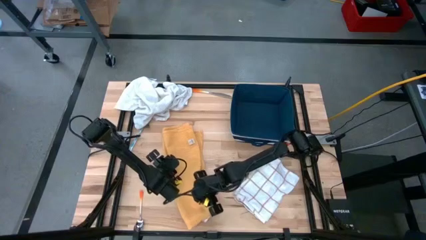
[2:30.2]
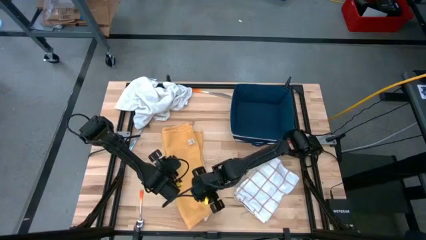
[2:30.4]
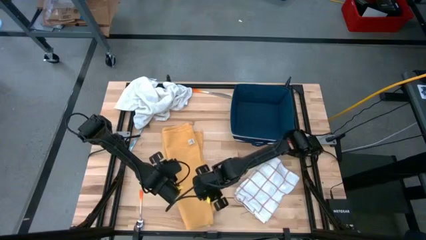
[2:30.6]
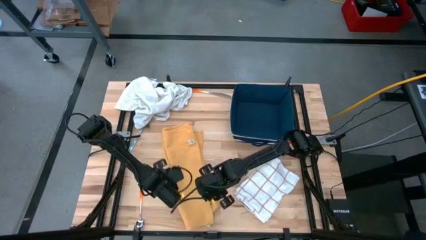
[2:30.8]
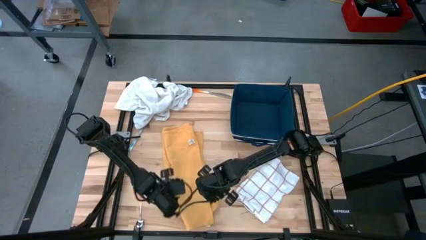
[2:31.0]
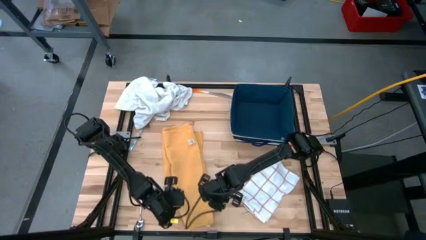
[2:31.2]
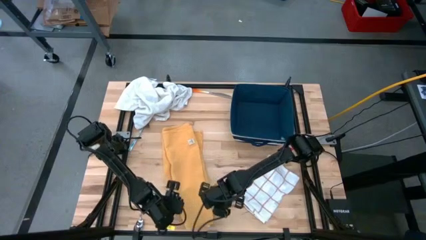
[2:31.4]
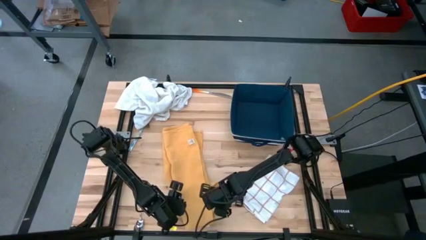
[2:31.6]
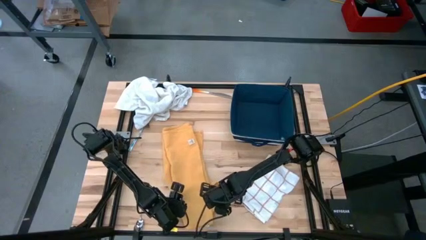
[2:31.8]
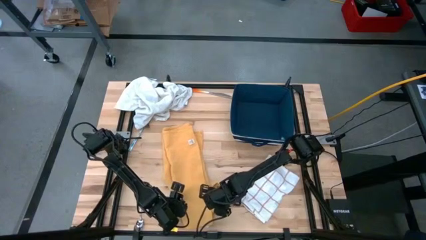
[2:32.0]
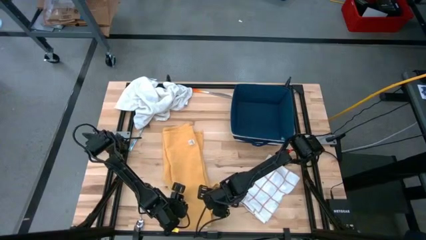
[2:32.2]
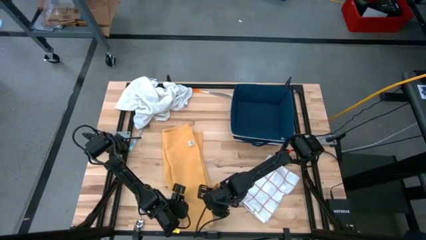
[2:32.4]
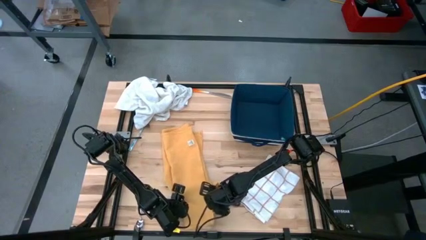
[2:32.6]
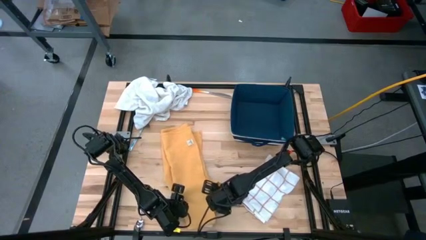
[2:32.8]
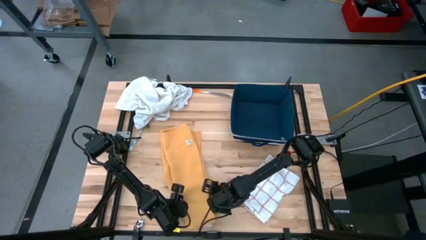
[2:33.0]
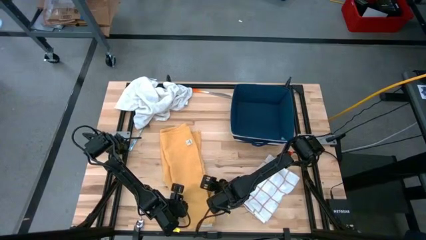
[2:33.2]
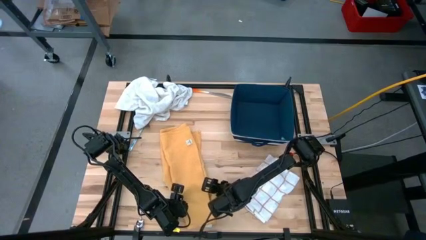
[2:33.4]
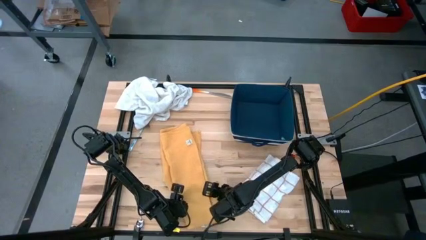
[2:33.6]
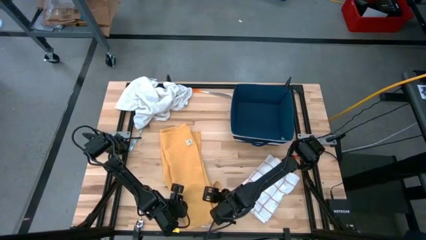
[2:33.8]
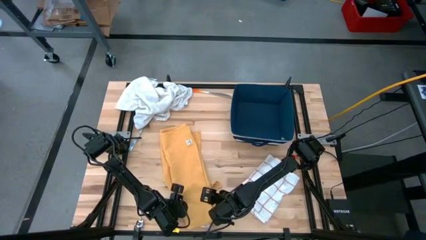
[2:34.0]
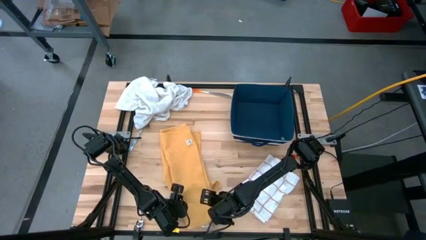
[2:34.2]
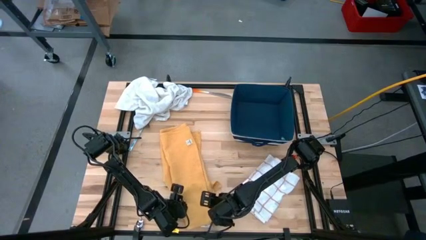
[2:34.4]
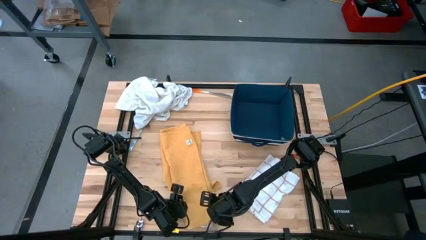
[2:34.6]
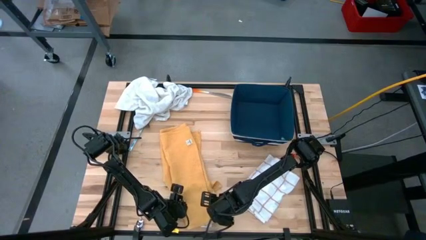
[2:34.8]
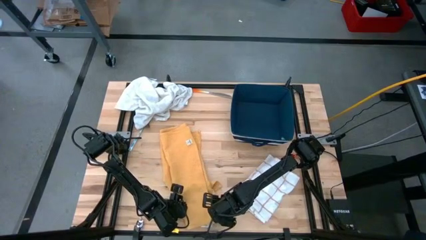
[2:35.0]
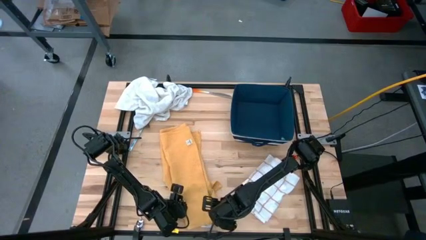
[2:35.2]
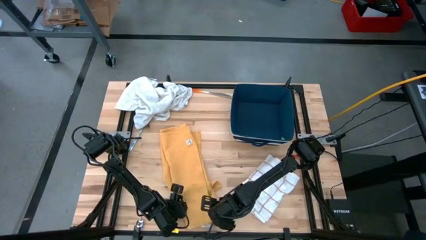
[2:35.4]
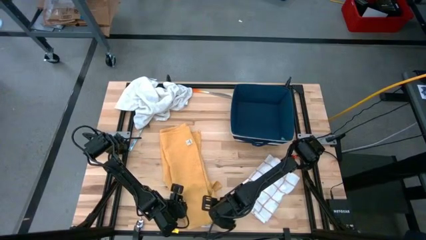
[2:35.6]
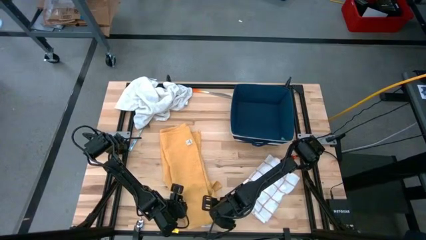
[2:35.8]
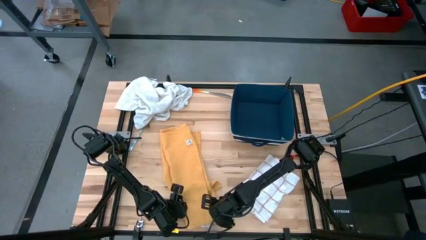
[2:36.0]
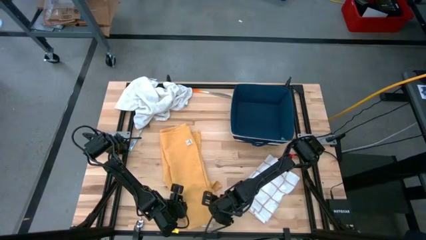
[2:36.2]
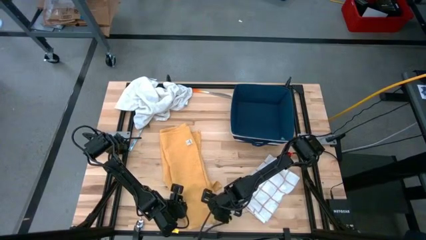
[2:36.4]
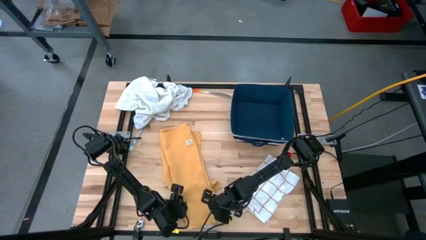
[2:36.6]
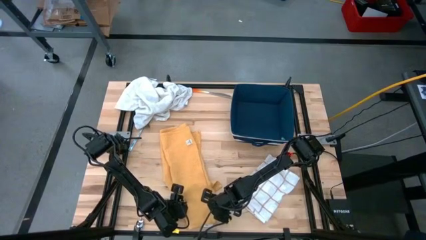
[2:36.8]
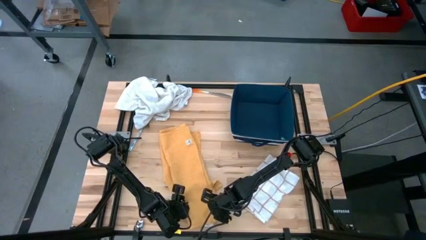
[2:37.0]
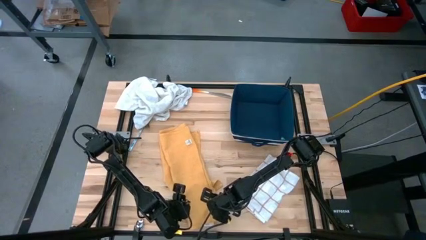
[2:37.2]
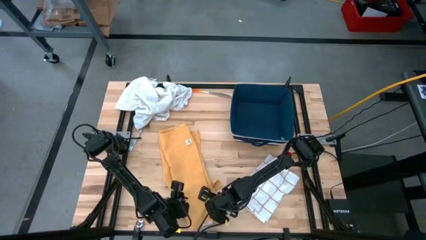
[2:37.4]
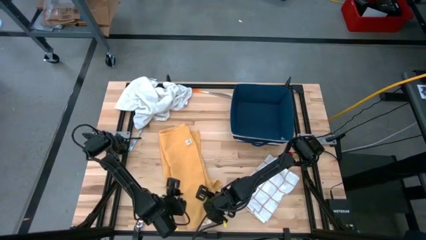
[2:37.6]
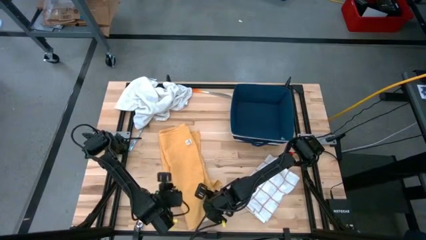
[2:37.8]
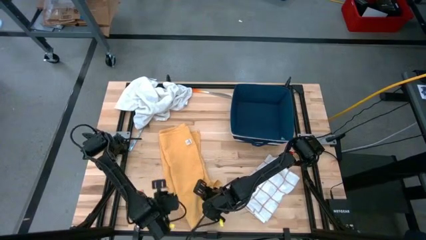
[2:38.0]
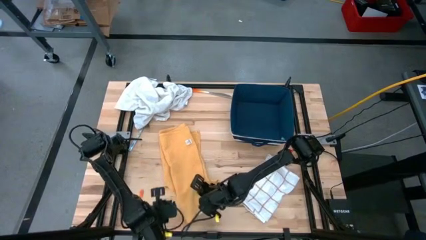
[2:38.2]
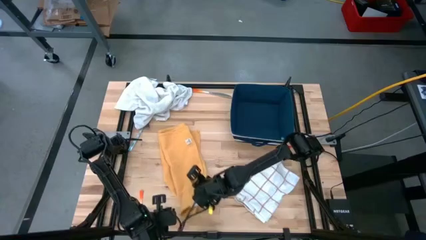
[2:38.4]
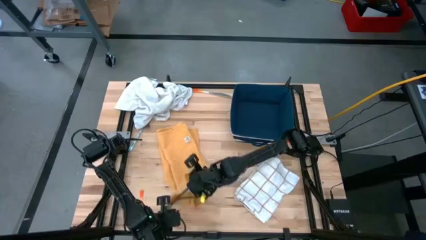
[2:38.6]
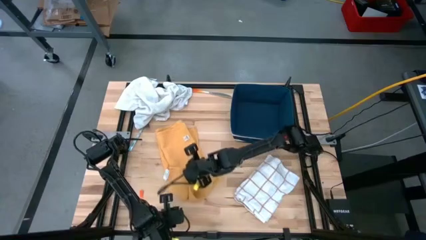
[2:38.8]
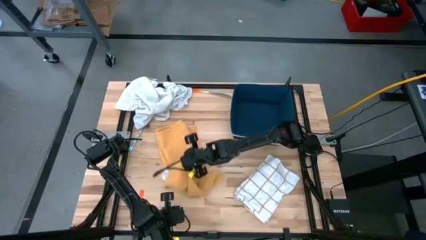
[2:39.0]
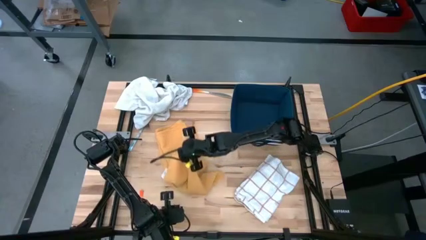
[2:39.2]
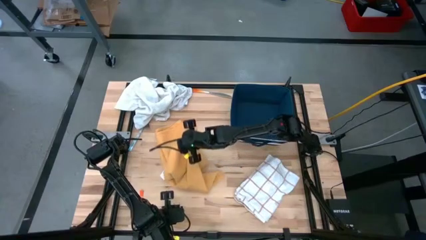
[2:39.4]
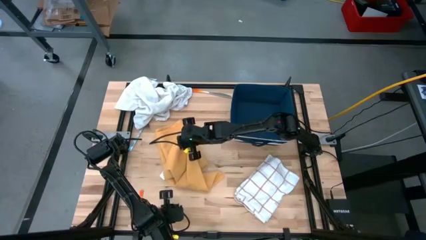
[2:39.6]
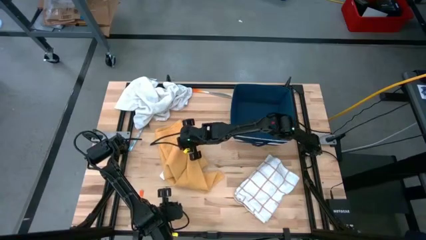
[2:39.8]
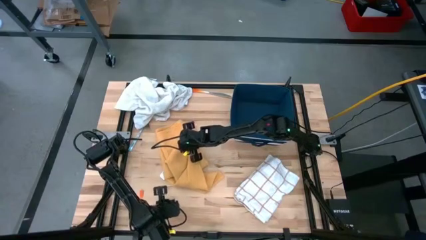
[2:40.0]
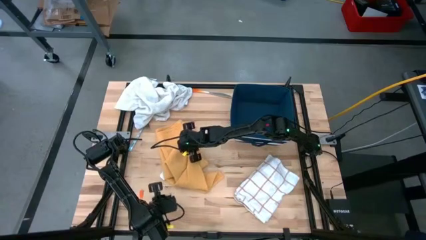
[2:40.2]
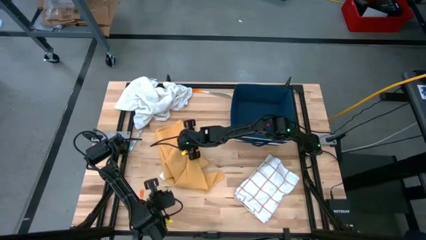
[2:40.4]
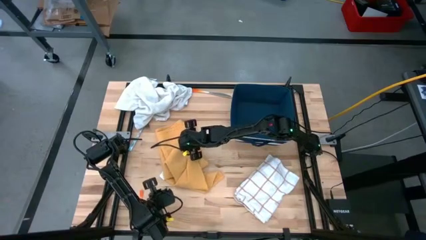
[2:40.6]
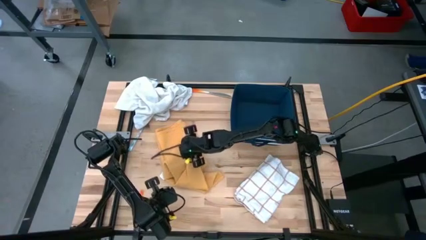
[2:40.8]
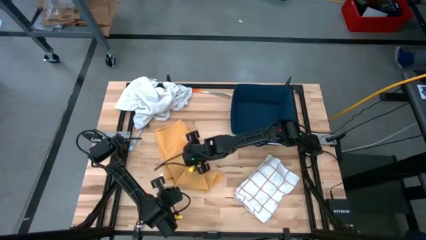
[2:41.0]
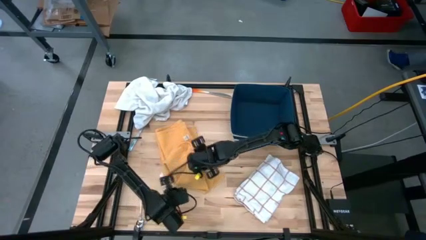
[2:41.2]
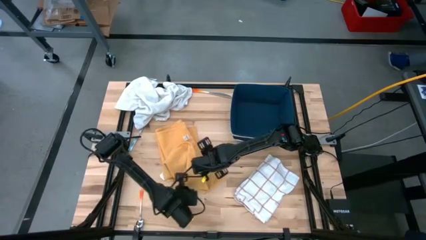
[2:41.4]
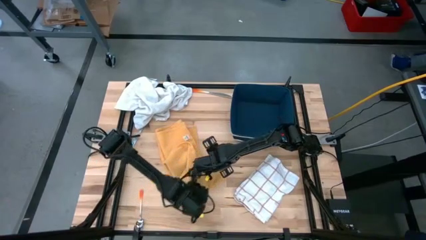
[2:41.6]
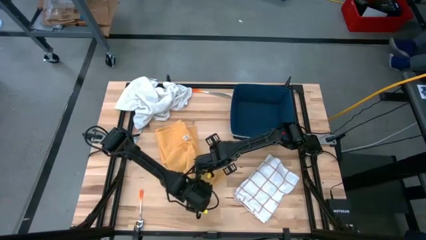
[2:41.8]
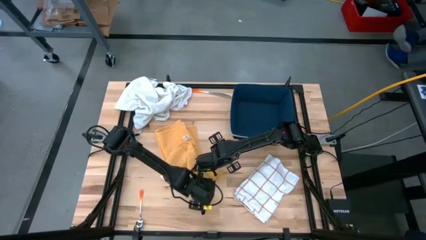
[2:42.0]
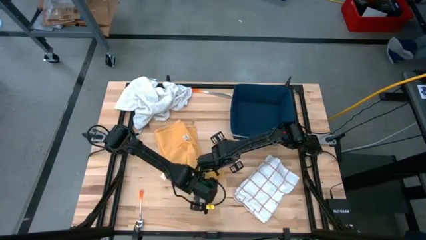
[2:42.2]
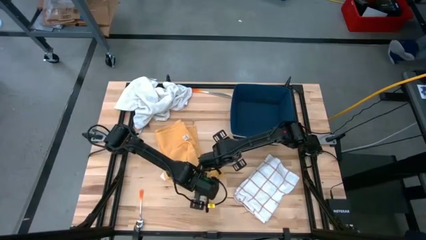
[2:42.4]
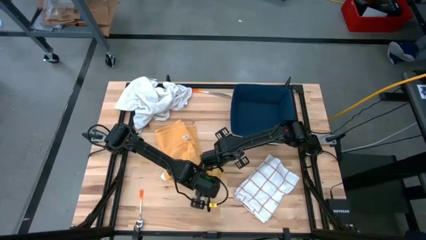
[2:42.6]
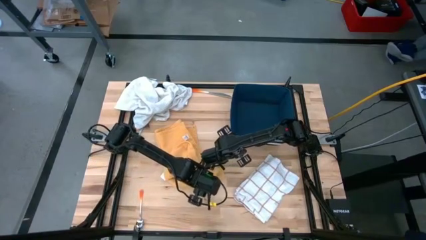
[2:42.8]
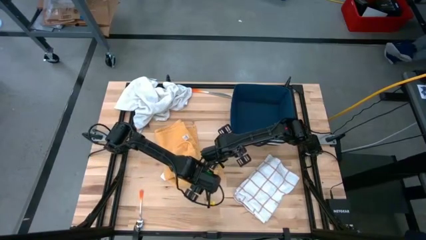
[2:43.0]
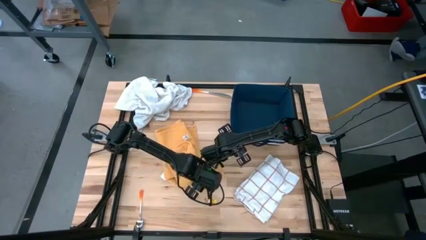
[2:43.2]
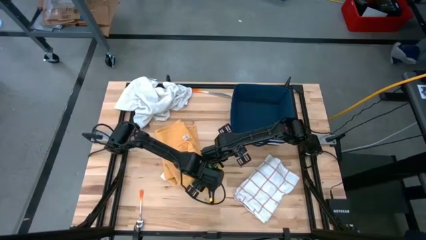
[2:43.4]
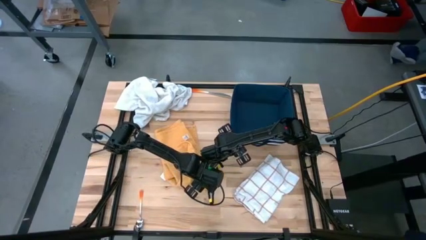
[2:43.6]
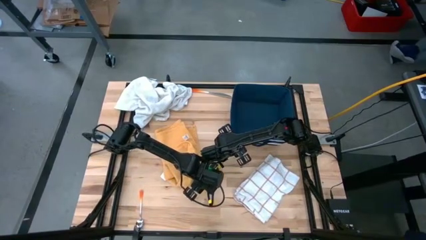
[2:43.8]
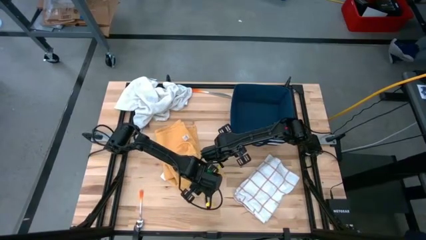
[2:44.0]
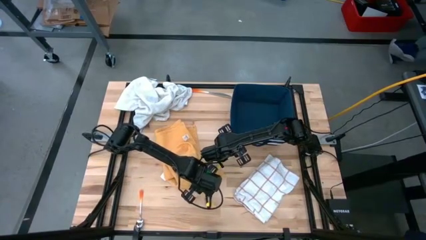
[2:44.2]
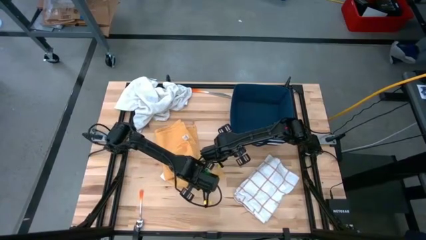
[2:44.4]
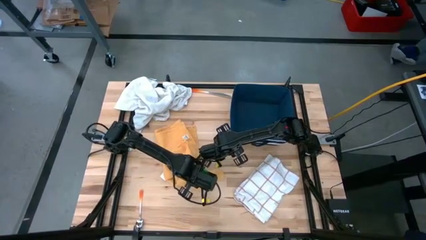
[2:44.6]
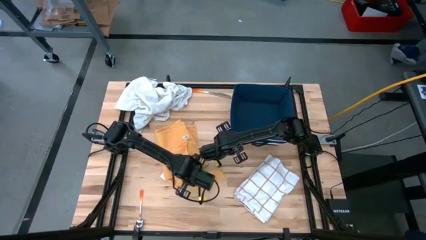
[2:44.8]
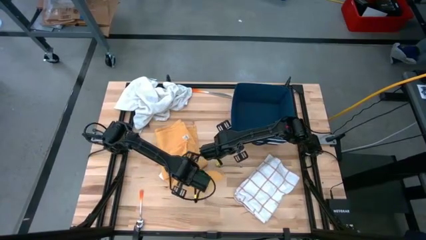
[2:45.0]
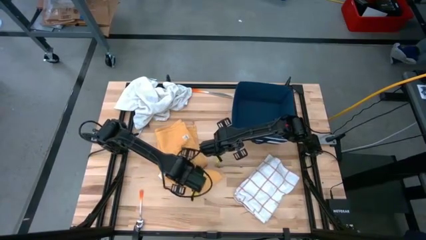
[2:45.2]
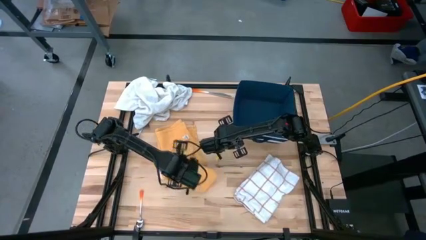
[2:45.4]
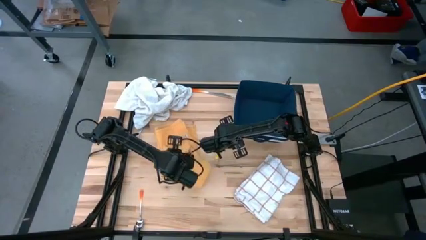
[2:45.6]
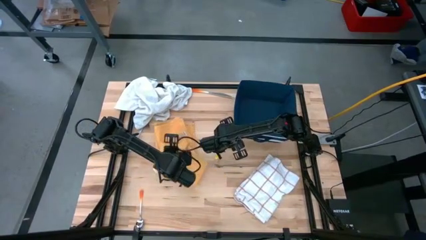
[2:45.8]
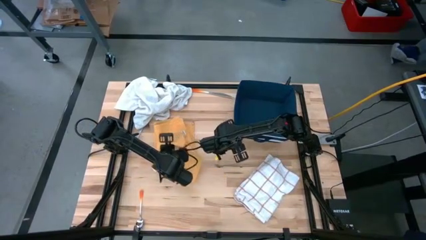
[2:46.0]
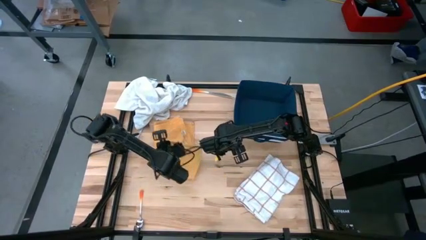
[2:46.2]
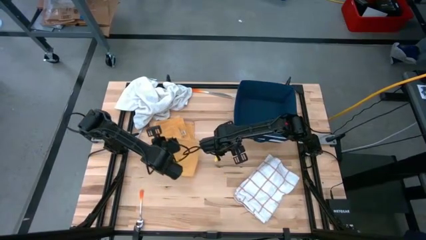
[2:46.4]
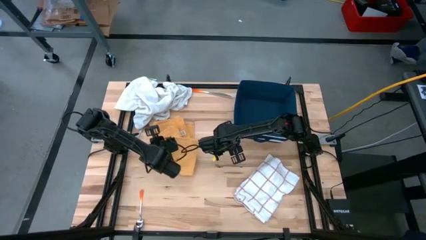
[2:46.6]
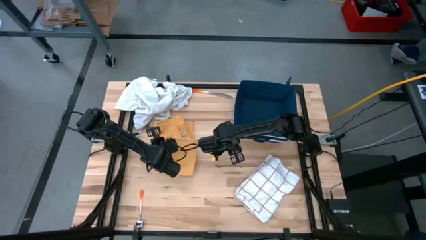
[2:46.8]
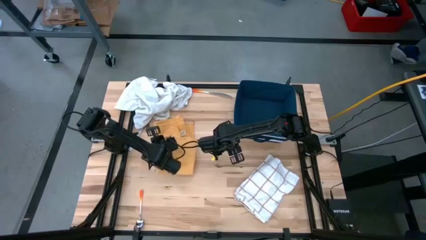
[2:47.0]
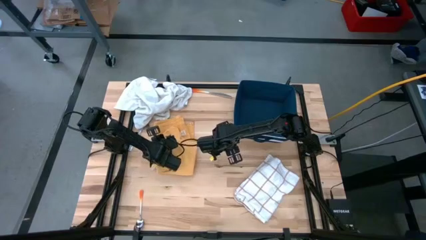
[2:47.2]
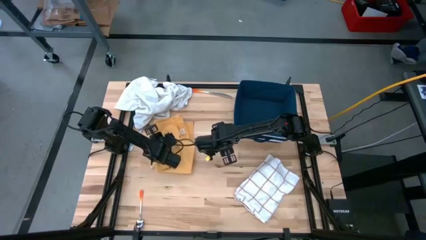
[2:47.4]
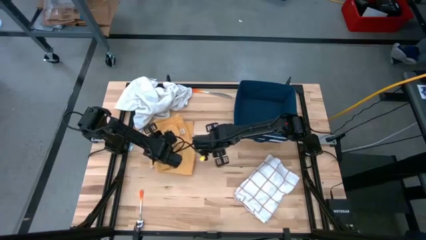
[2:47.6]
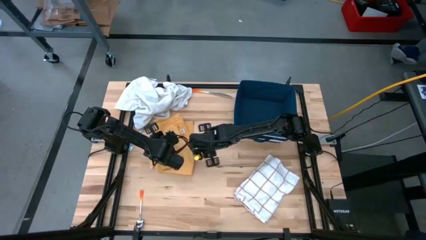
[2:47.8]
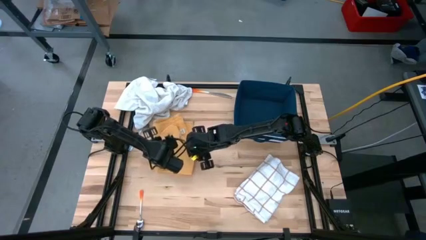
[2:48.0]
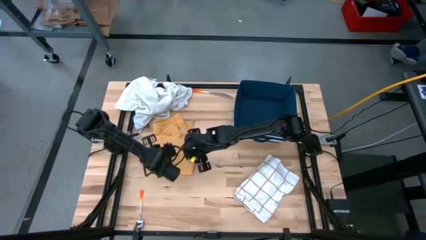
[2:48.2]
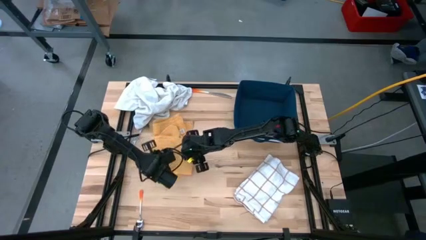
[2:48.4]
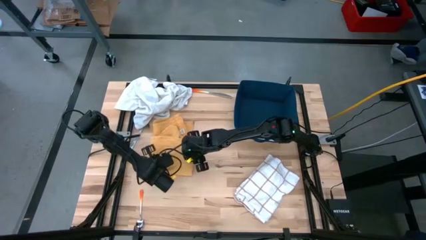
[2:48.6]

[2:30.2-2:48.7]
Task: Fold towel
Fold the yellow towel
